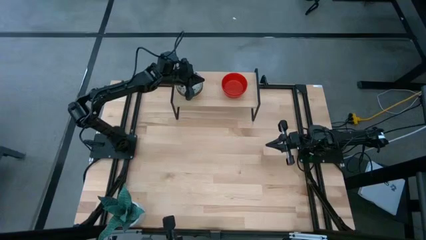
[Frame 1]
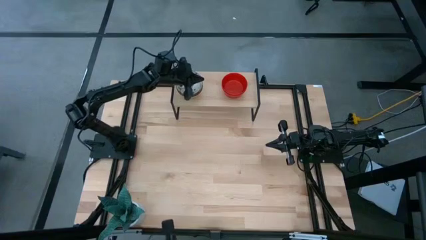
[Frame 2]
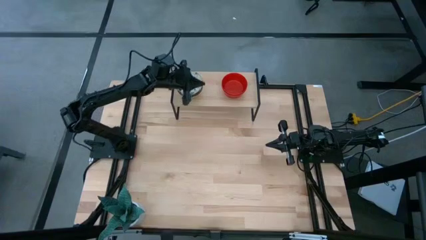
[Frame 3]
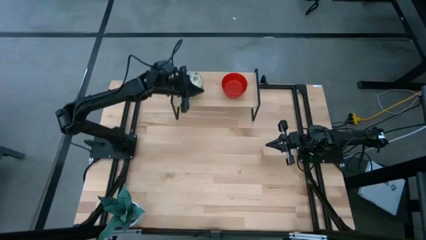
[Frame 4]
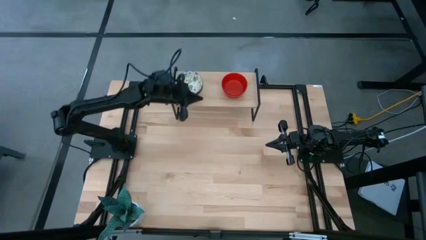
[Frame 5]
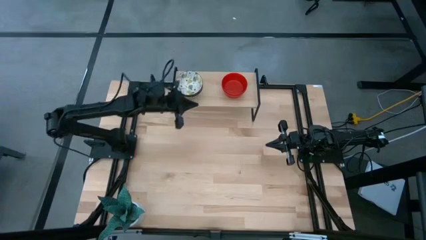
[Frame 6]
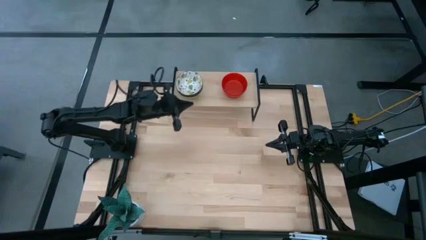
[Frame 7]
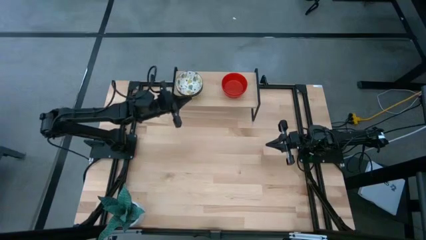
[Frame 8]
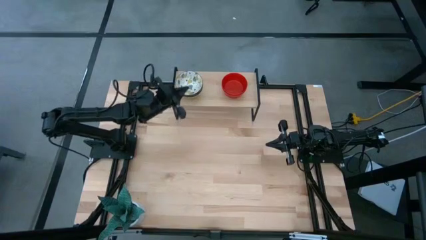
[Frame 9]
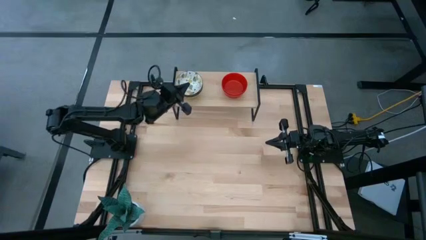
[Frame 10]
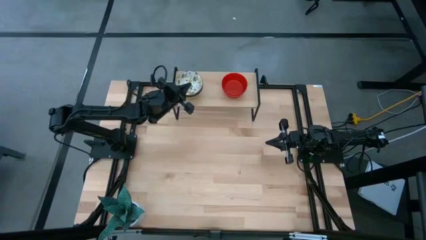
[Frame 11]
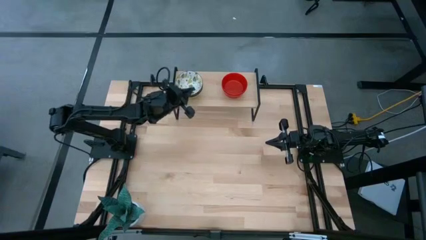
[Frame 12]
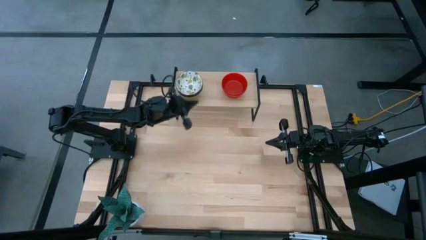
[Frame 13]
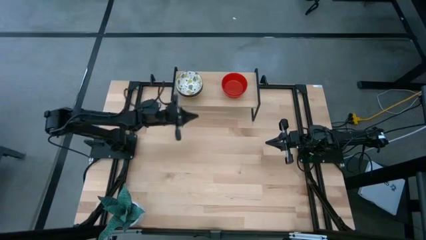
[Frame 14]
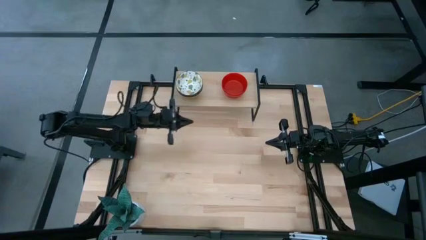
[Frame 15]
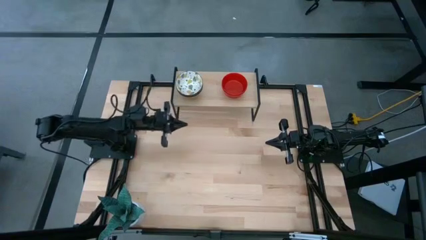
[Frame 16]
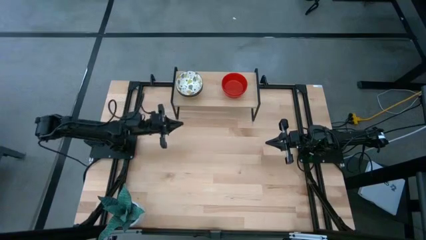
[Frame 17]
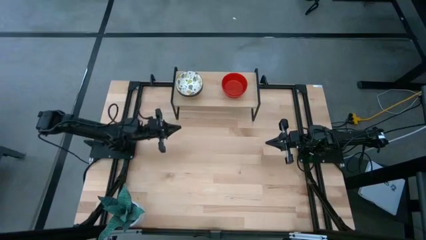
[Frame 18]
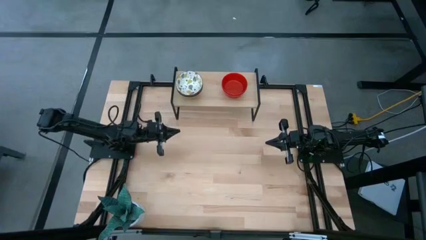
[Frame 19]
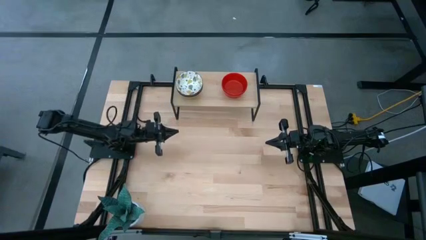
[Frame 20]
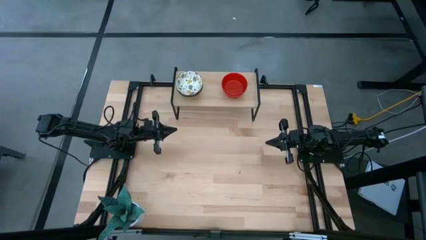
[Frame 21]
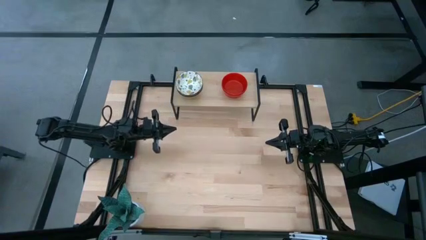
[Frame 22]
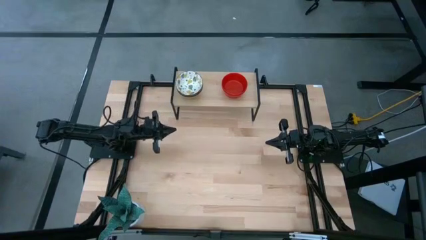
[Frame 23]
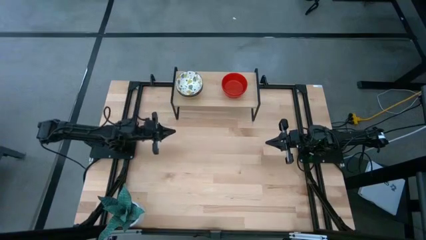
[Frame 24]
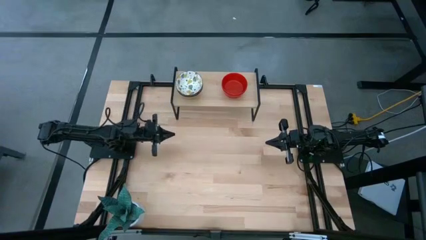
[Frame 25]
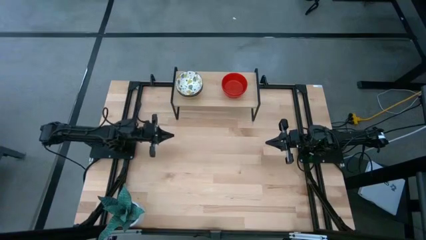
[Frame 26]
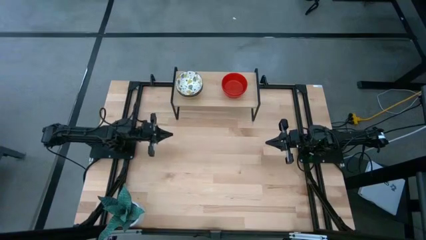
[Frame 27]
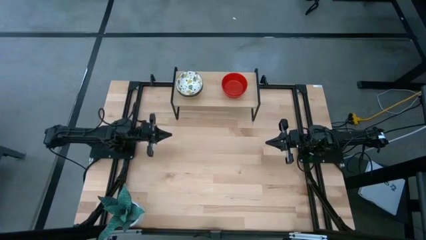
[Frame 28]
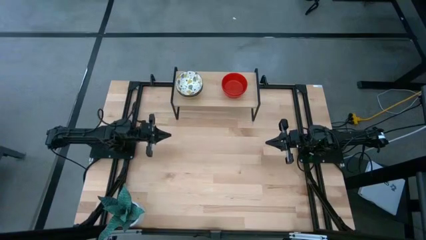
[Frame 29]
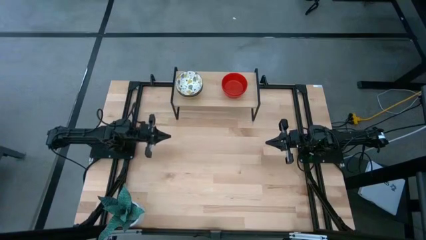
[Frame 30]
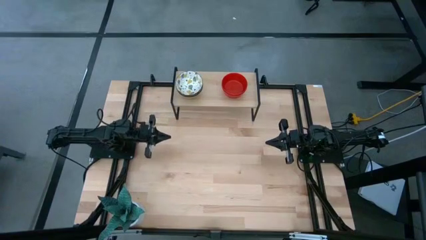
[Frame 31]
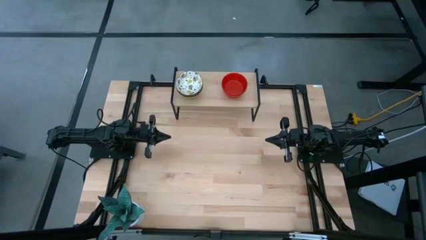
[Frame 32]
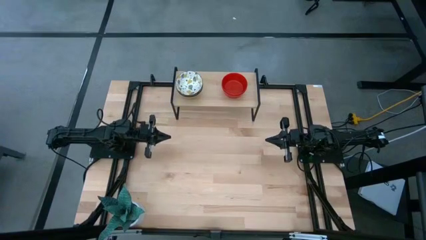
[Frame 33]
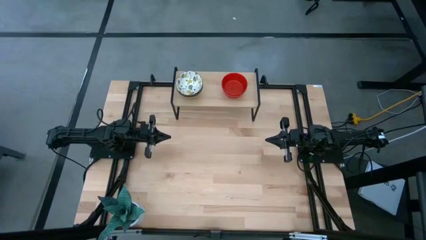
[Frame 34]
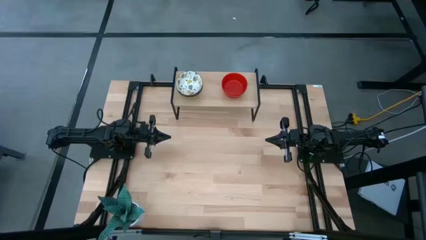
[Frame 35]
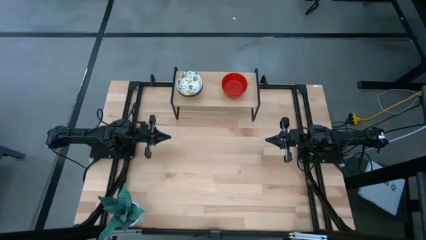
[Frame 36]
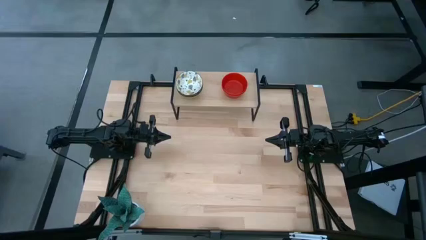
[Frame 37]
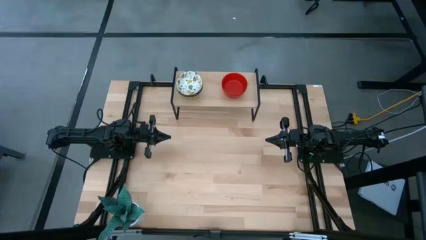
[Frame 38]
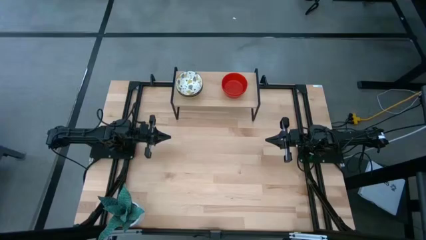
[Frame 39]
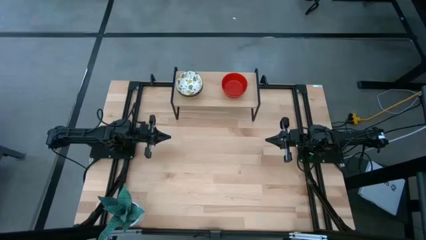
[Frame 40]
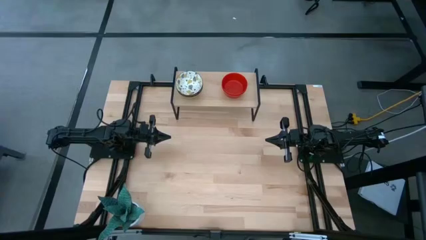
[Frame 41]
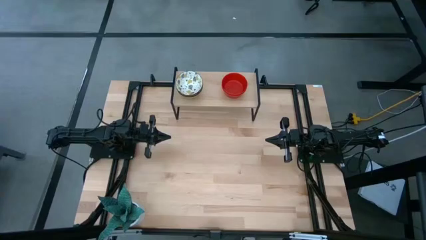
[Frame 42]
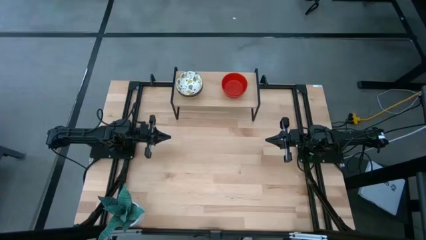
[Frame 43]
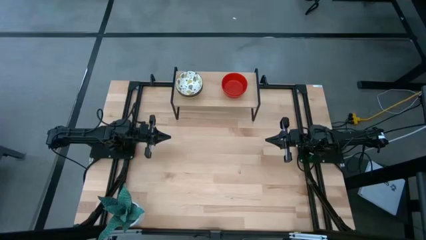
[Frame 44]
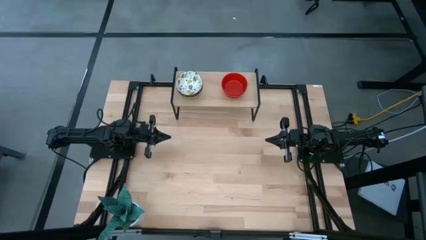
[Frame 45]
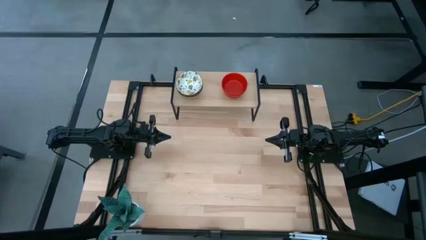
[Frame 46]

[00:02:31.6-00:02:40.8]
Task: Pick & Place Mini bowls
Return to Home Position
